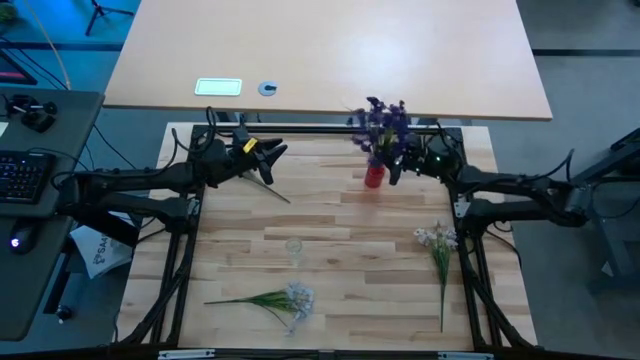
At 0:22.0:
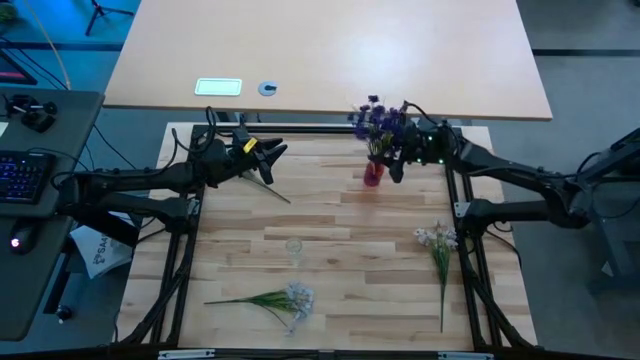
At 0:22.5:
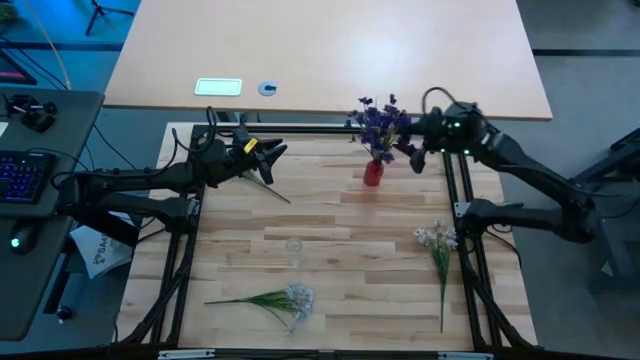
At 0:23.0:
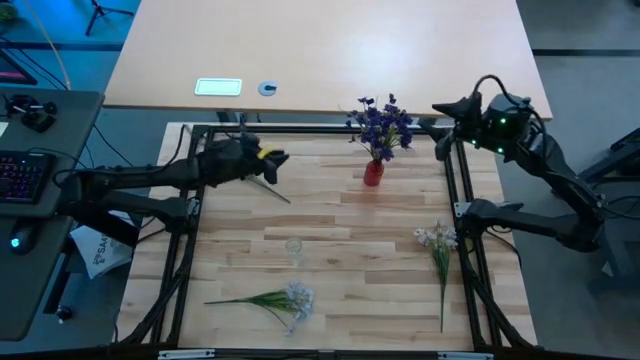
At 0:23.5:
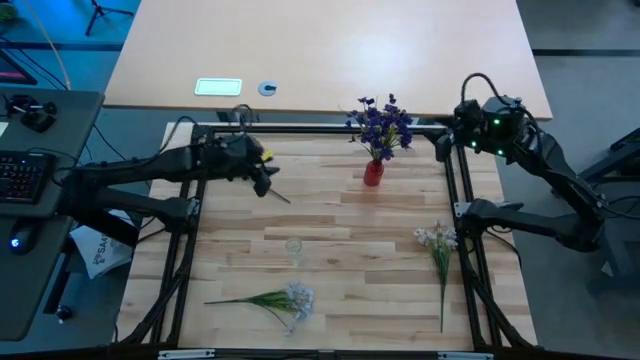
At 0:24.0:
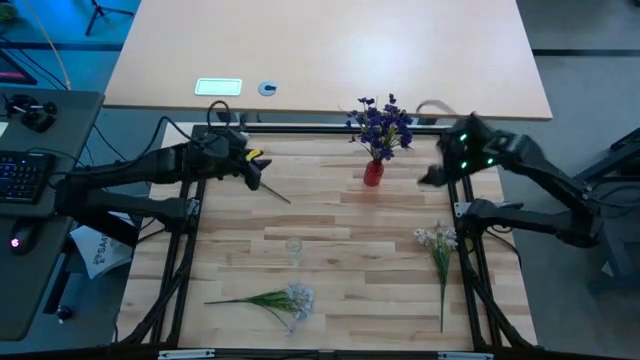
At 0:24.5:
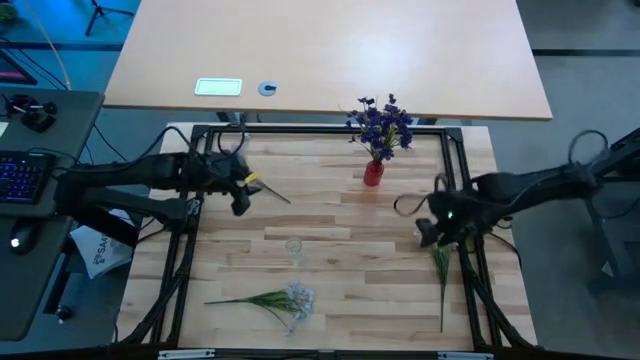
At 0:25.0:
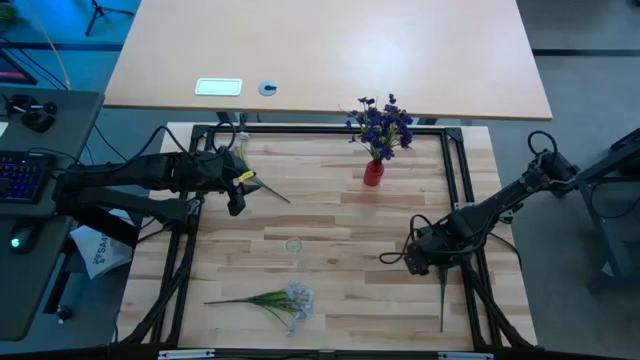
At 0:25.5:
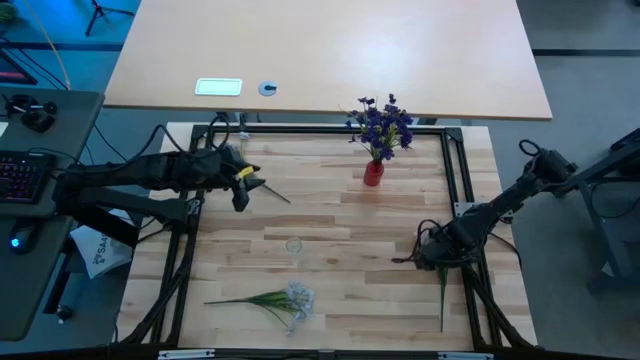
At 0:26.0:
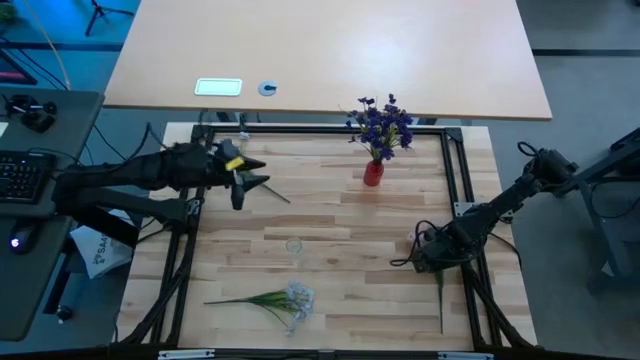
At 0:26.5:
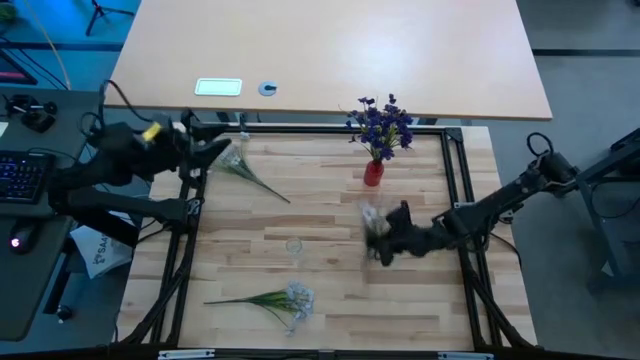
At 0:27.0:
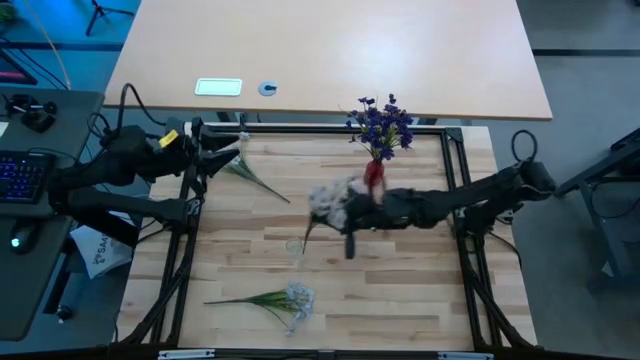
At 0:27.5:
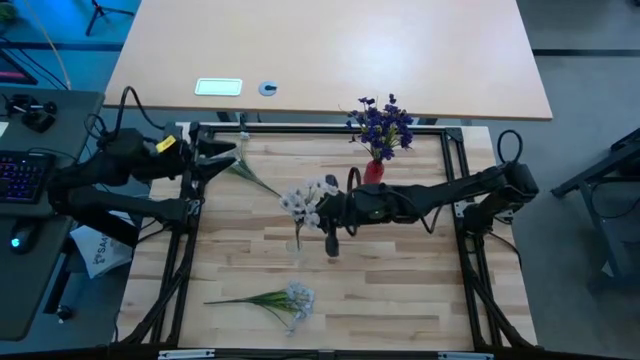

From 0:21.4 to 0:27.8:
Task: Sort flowers into vase by color
Put the middle right white flowers into the transparent vase

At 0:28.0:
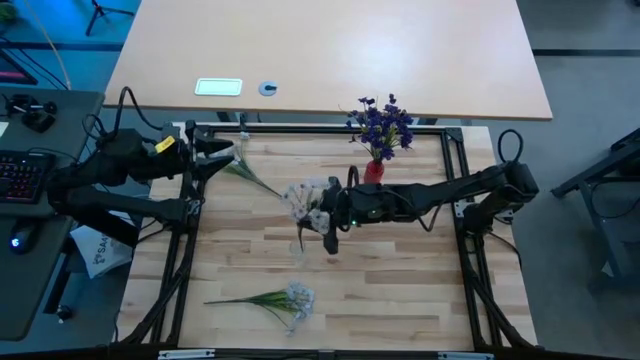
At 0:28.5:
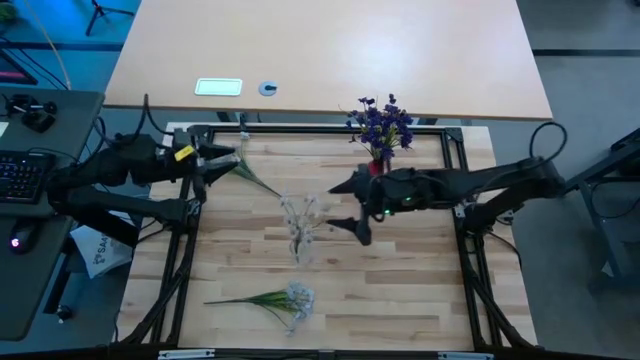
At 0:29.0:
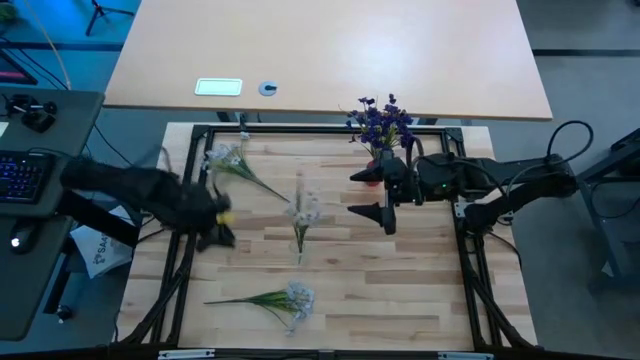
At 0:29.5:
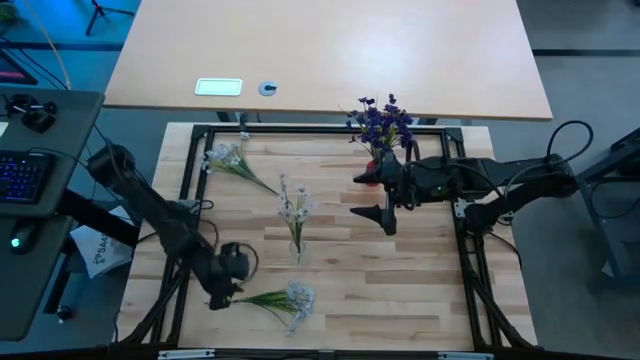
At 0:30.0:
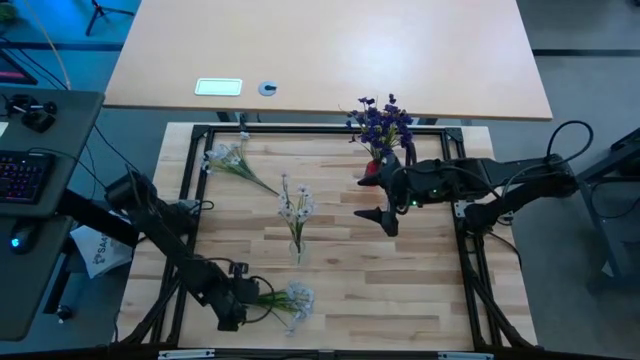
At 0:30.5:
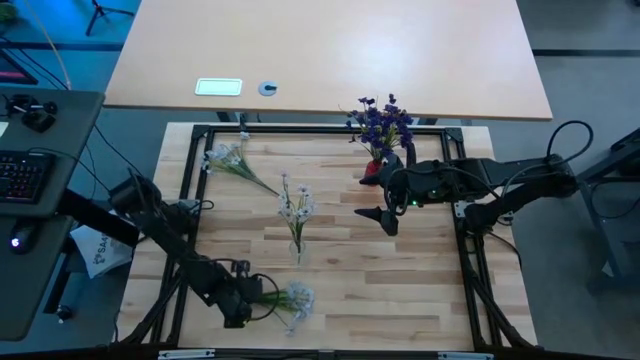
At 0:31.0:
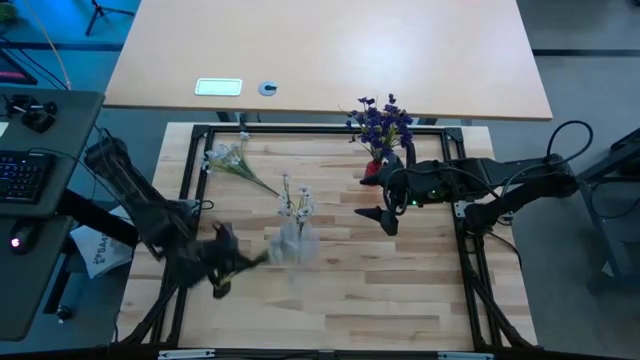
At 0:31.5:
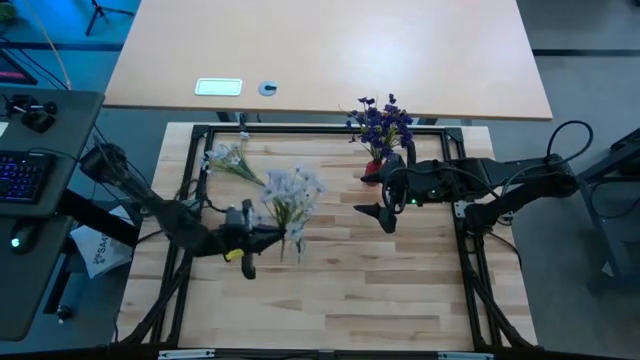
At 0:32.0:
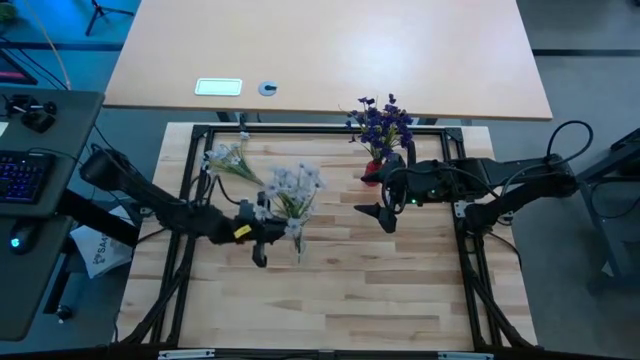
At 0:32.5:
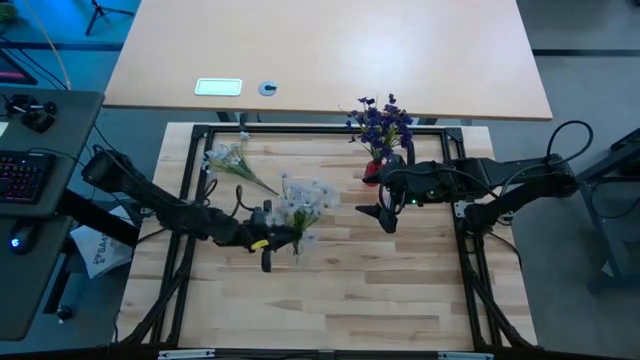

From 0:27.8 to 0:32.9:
Put the bottom white flowers into the transparent vase

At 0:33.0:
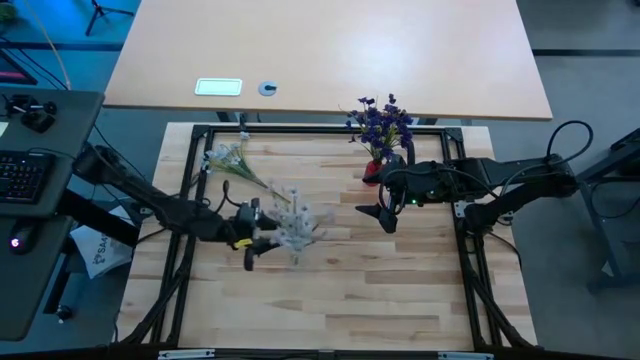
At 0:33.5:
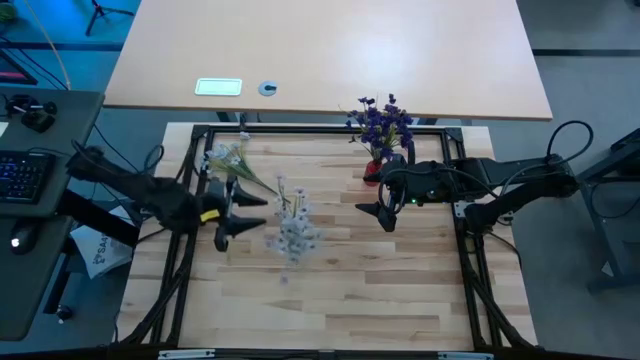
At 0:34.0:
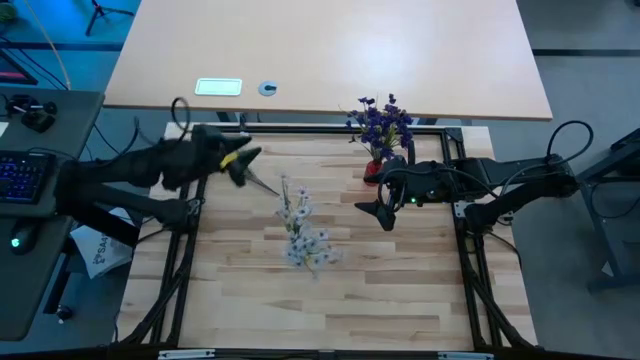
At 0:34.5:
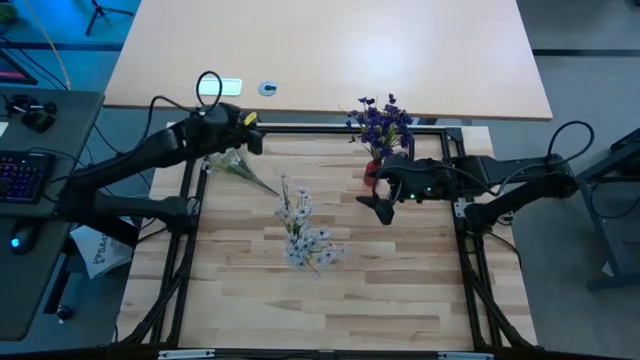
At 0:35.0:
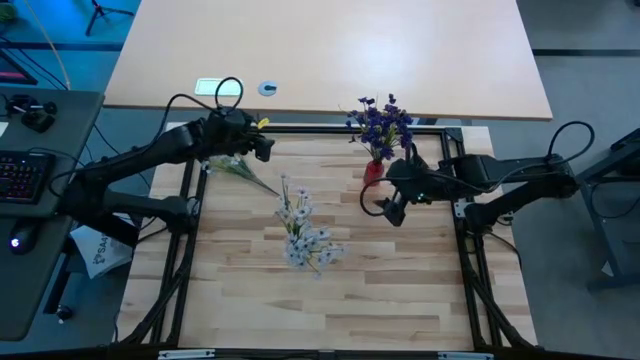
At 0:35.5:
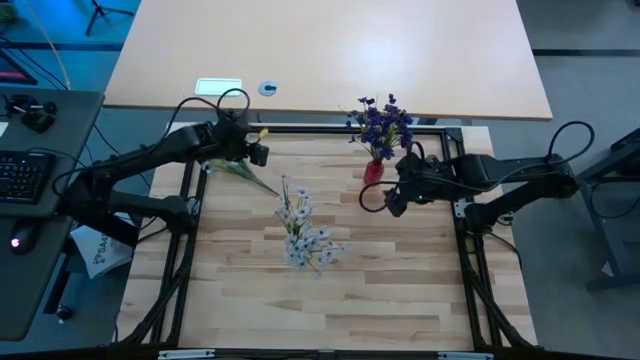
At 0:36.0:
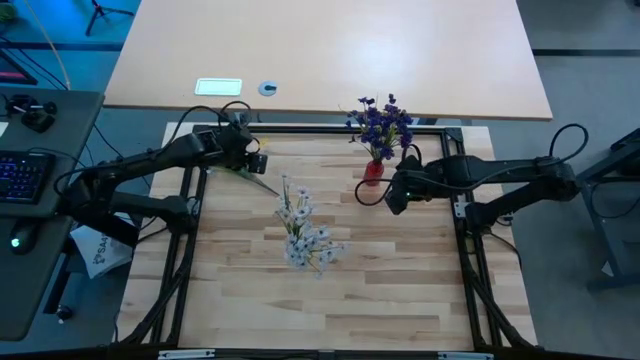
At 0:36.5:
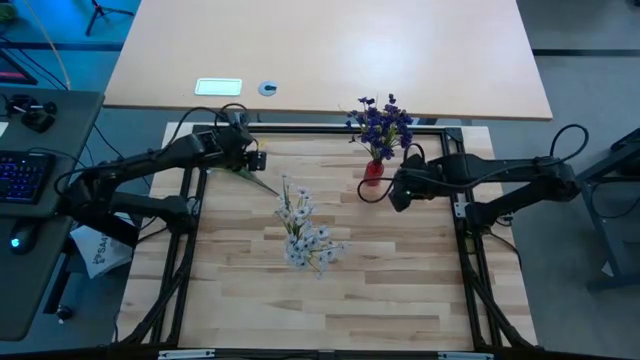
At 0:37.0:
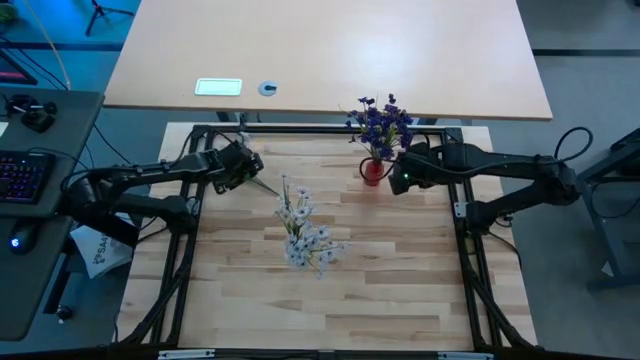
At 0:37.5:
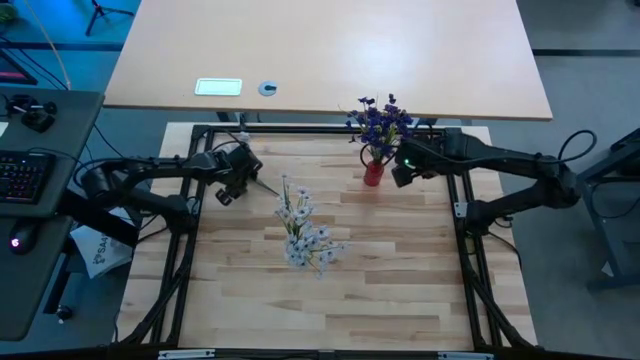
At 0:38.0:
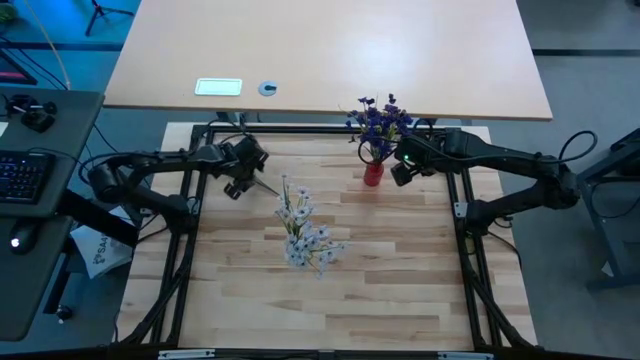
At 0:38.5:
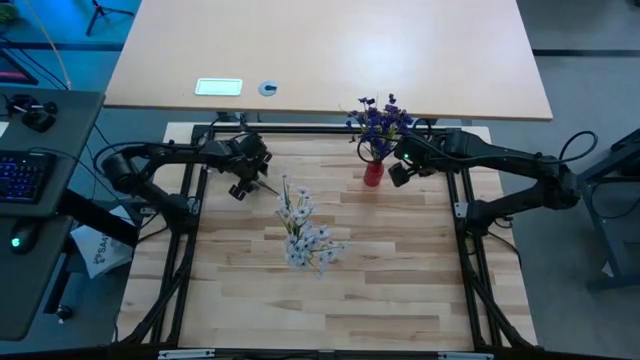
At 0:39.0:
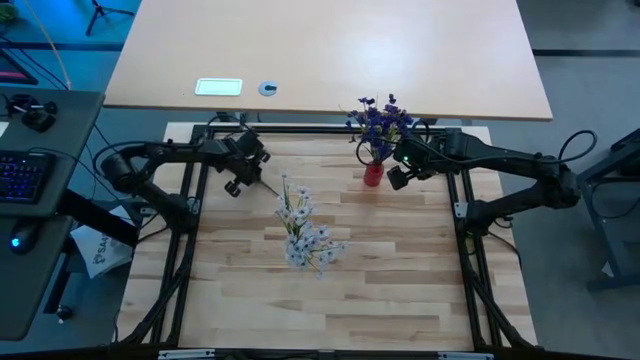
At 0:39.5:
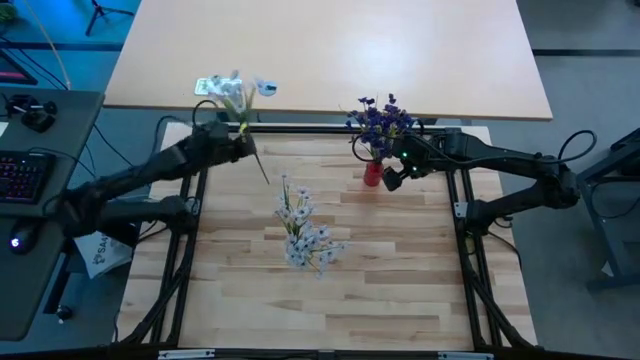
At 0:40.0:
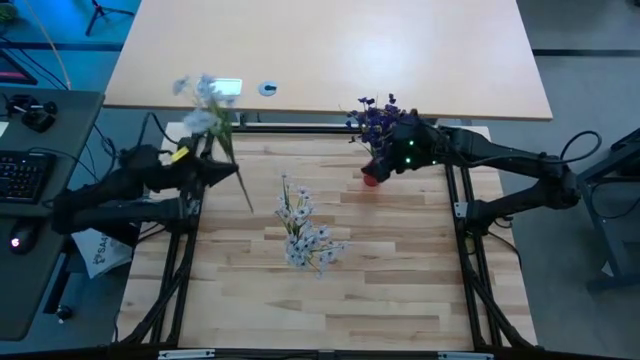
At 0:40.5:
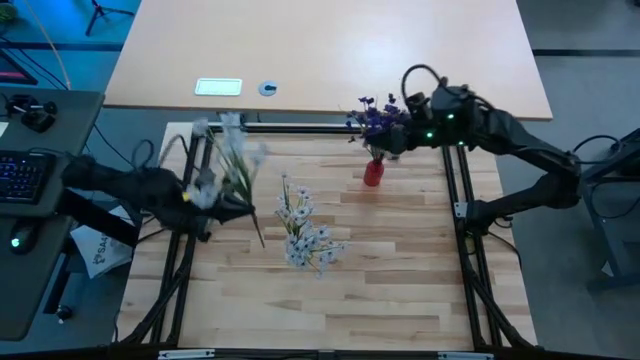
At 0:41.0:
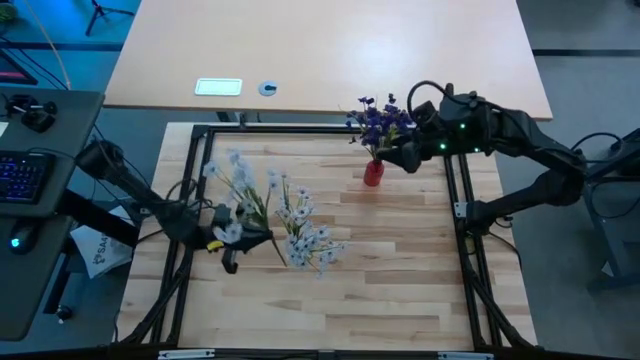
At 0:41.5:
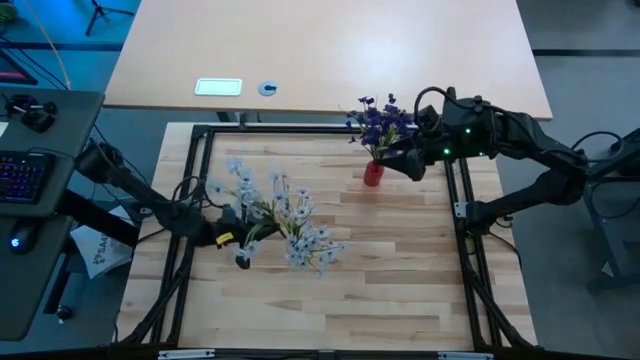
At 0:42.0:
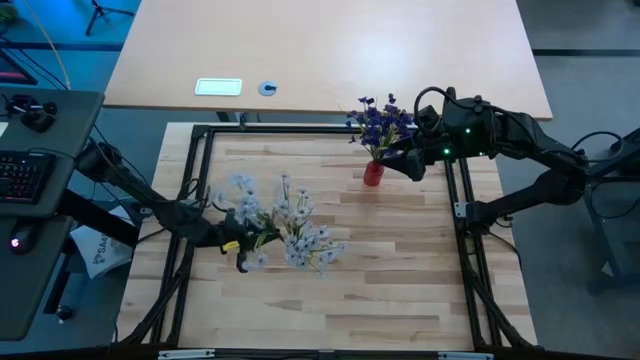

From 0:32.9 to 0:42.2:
Put the white flowers into the transparent vase
